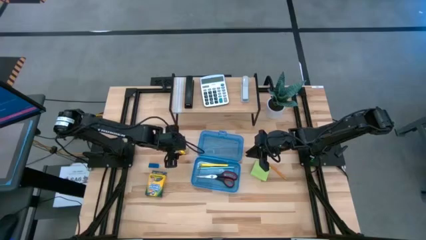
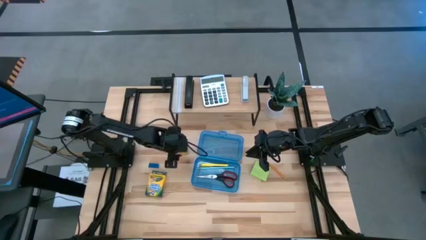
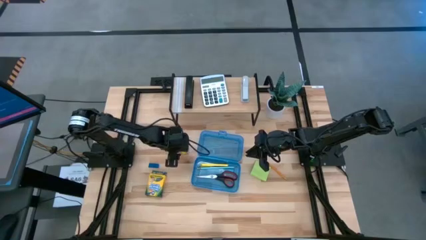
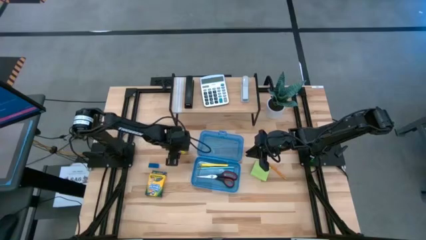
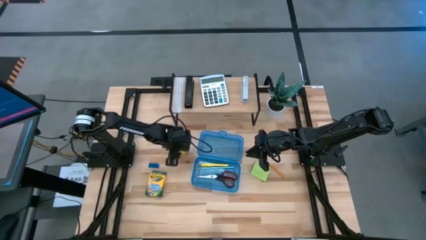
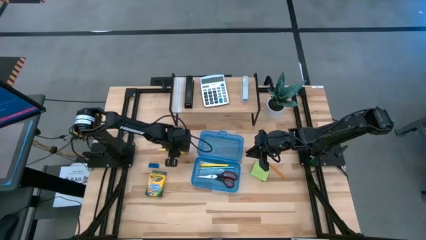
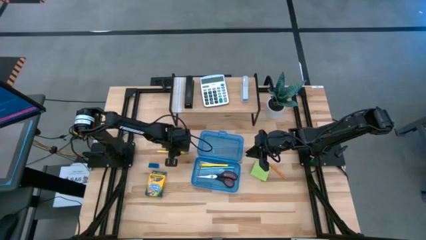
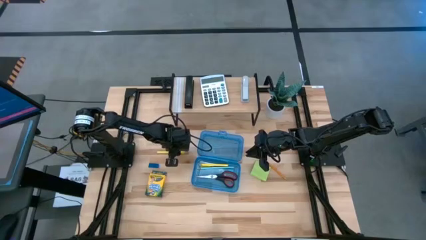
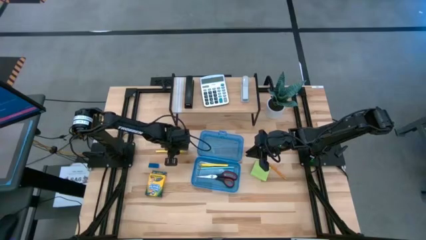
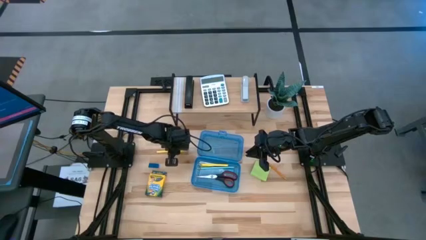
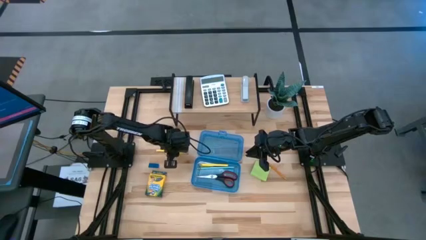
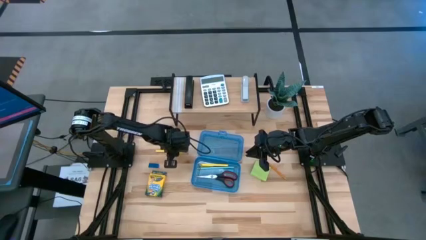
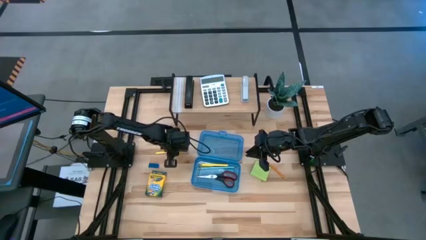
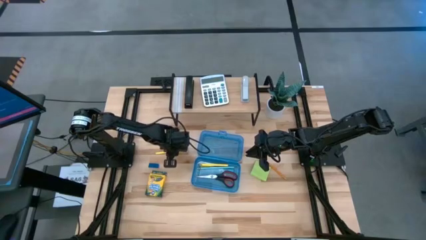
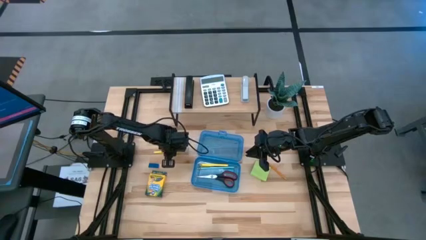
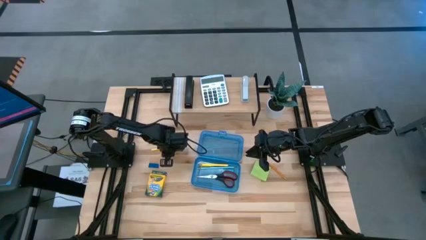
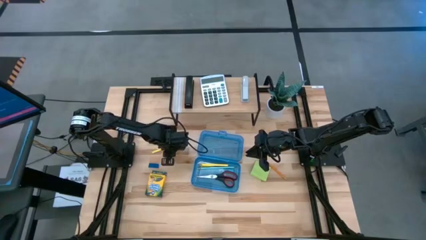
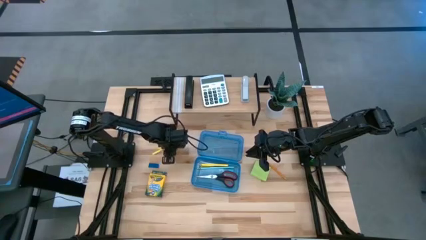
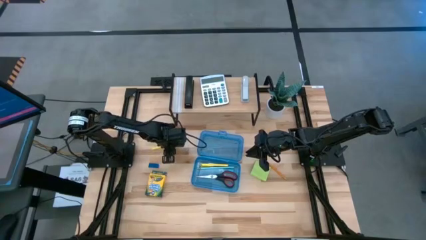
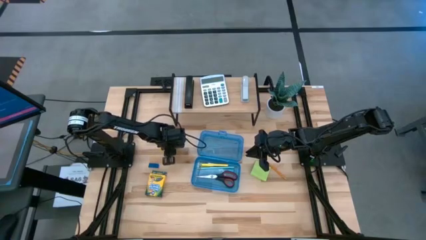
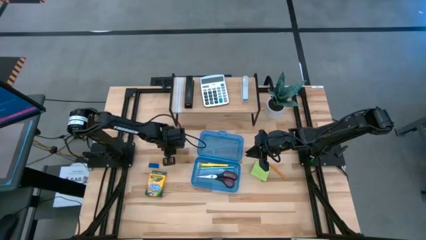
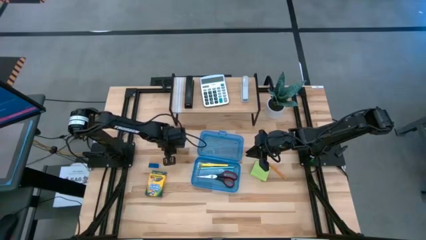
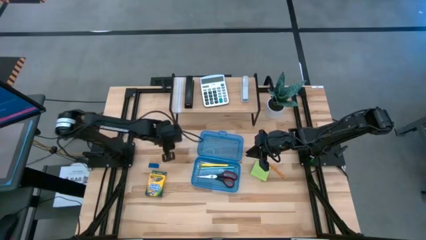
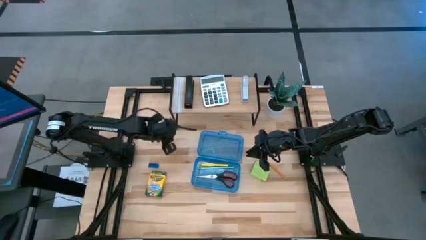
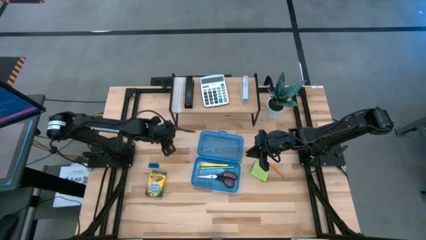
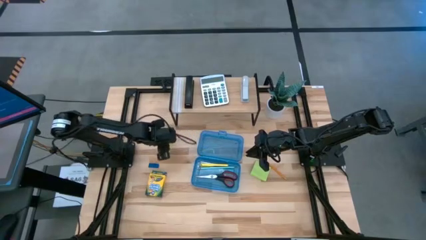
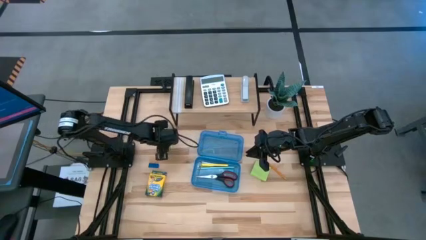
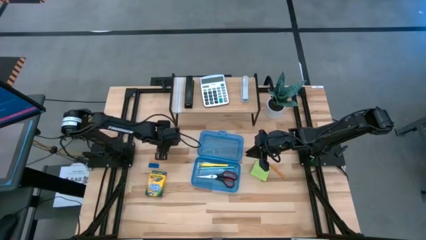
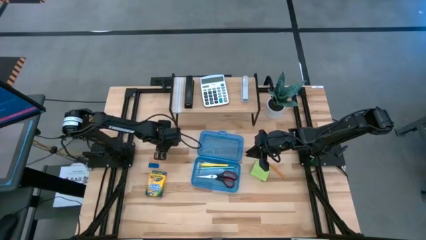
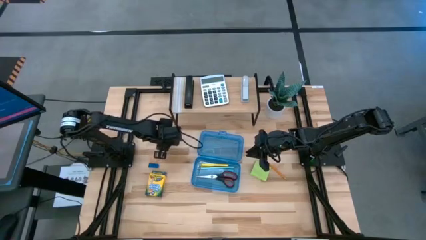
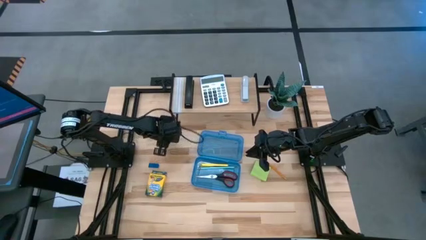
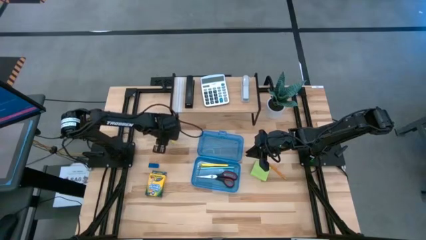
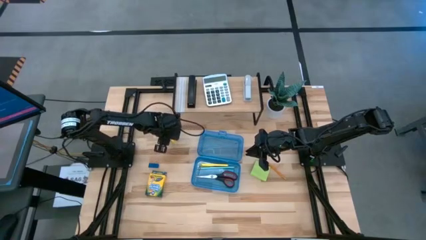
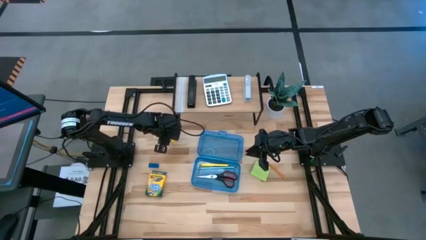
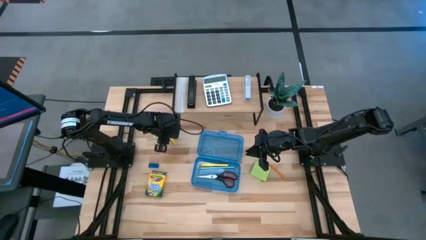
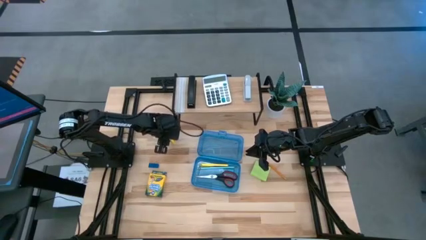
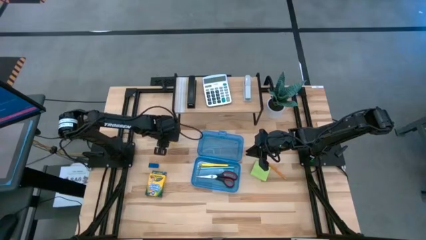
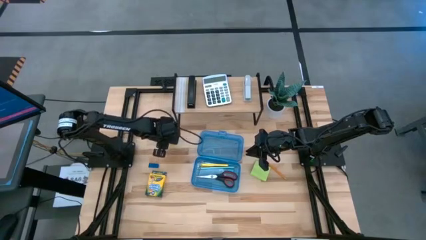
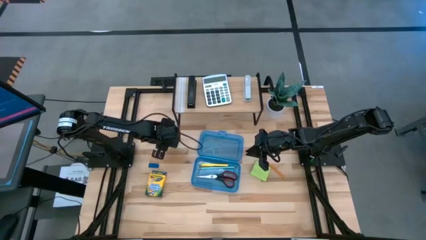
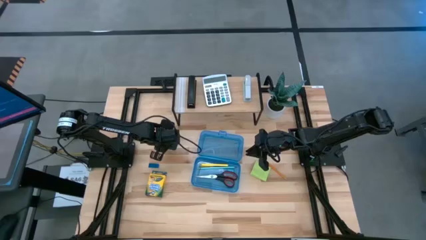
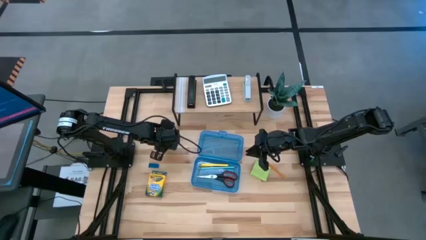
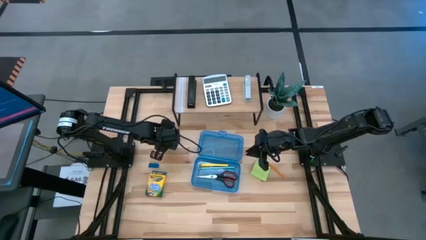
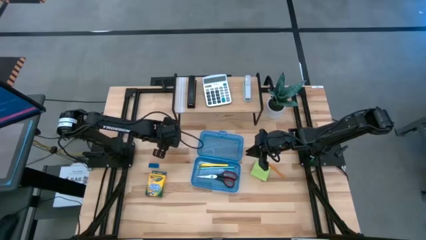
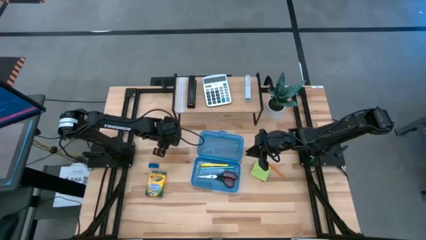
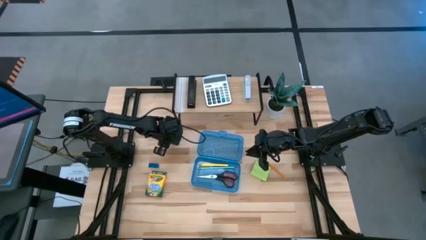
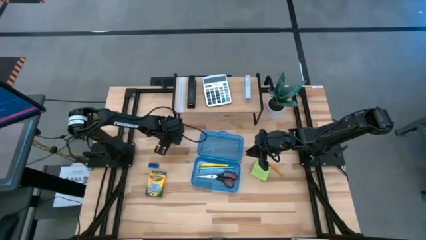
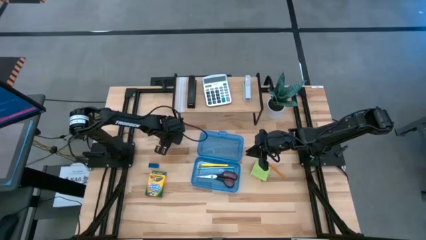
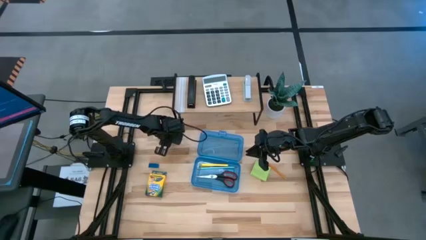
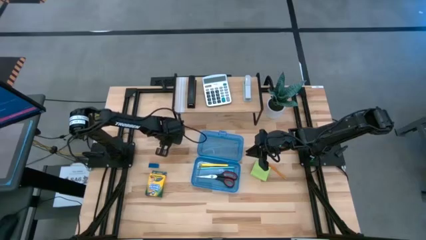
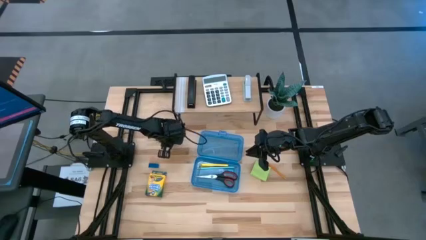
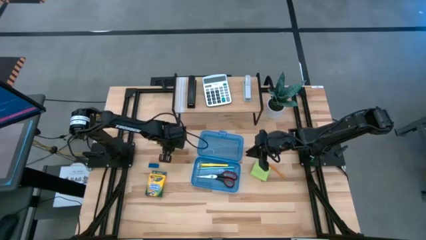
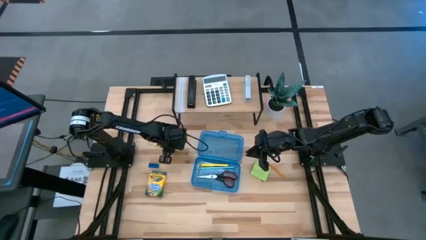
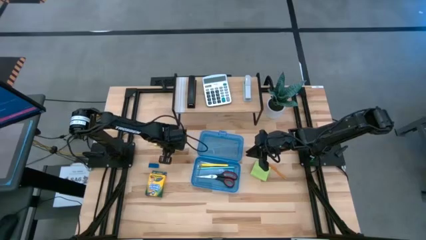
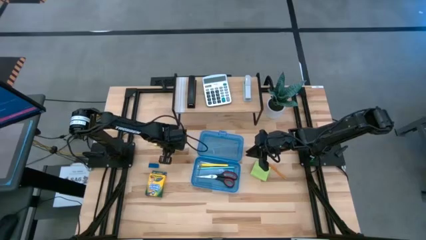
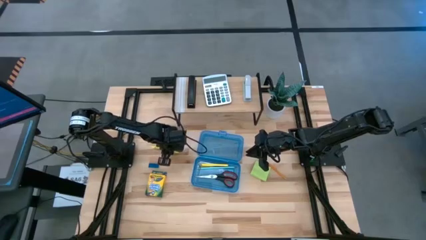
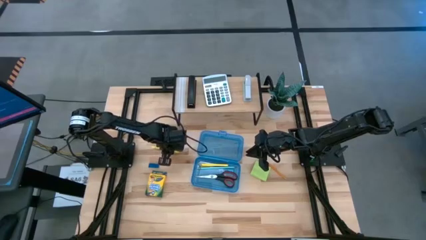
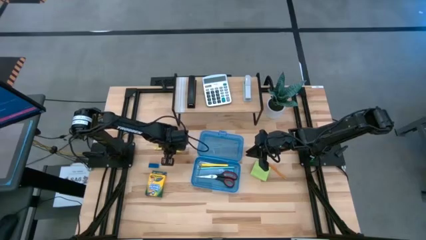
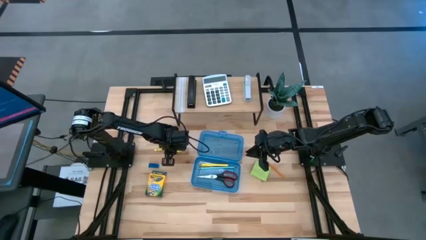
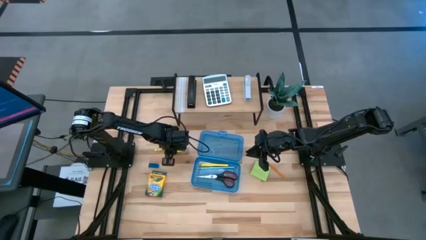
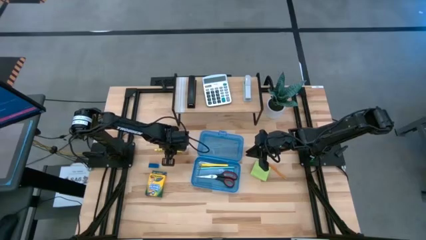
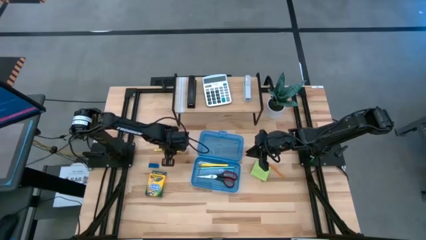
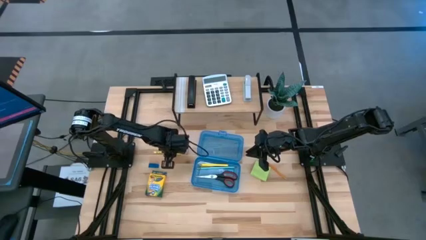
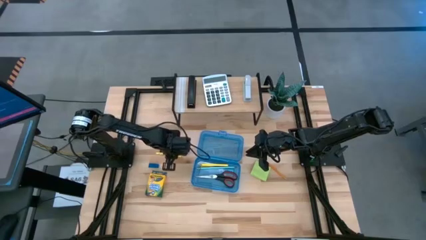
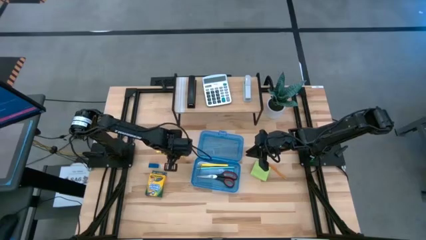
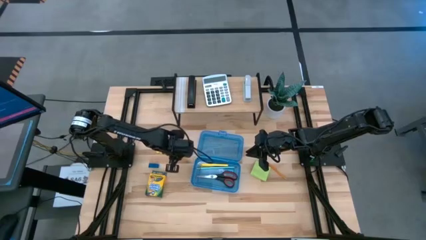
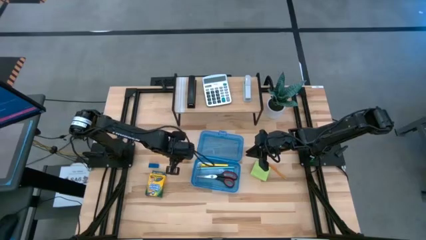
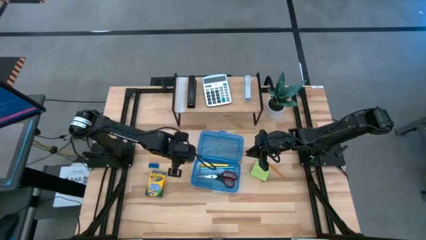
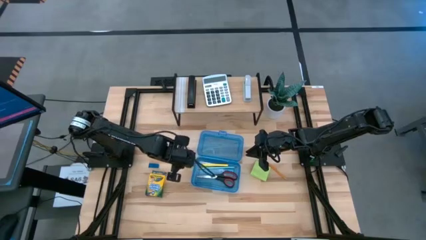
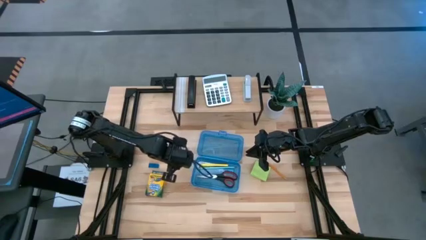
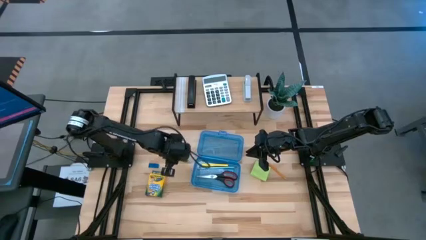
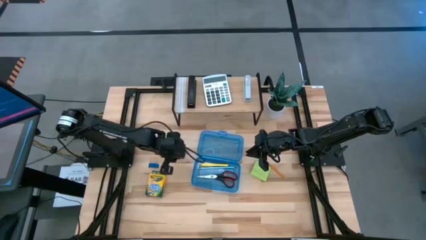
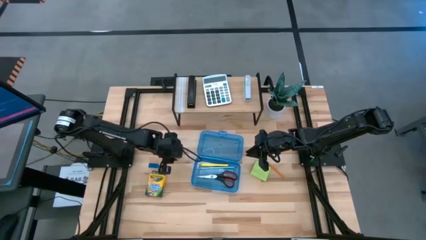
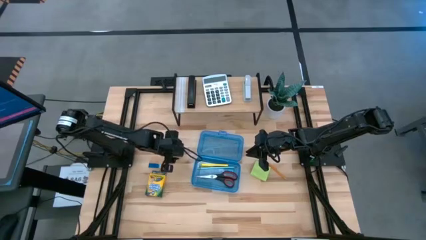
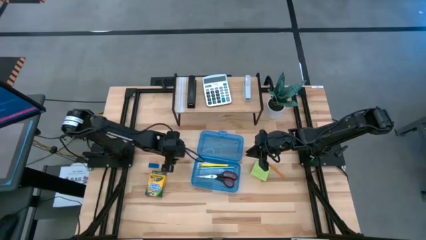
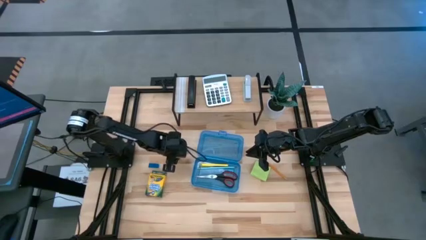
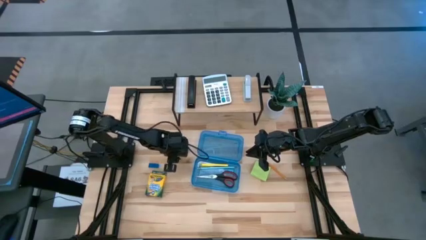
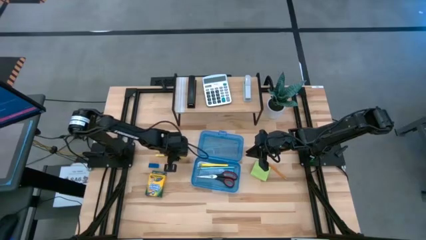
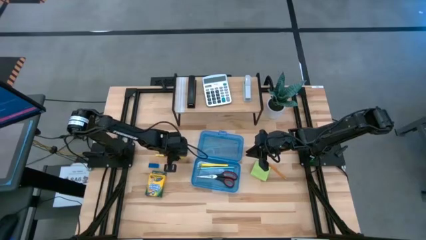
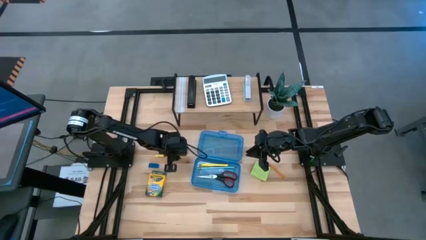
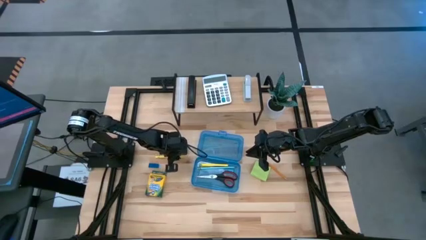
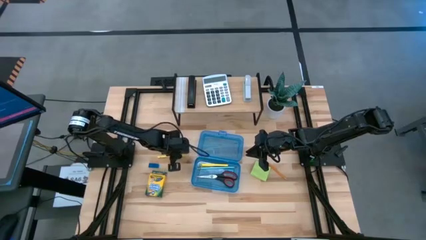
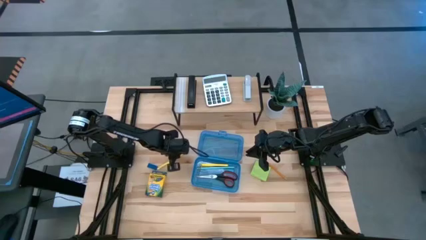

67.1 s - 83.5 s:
Task: Pack school essentials
Put the yellow pen into the blue supply box
